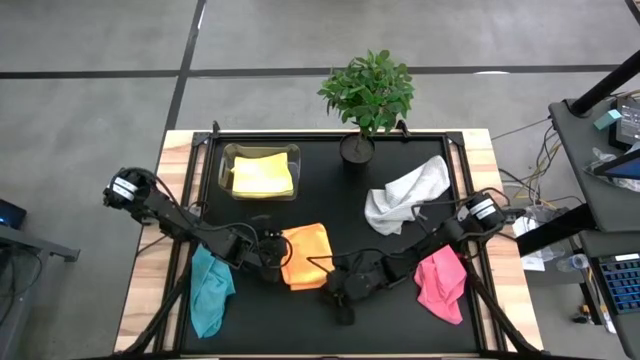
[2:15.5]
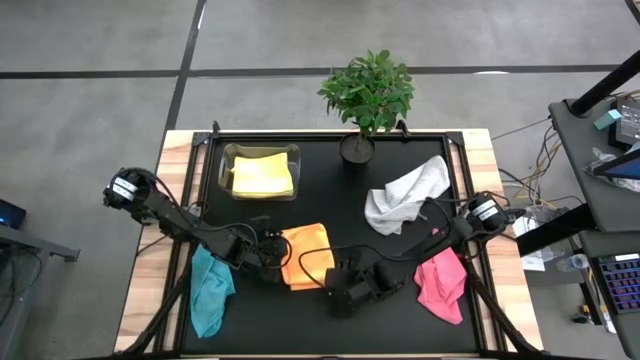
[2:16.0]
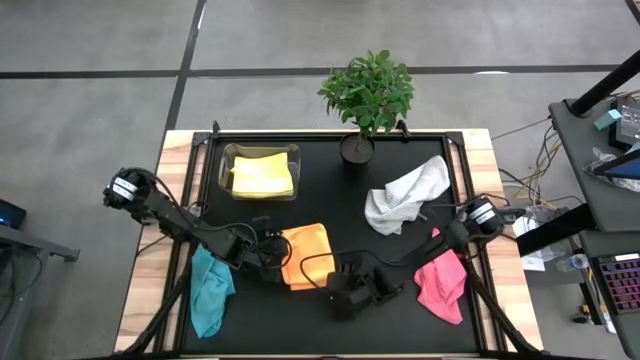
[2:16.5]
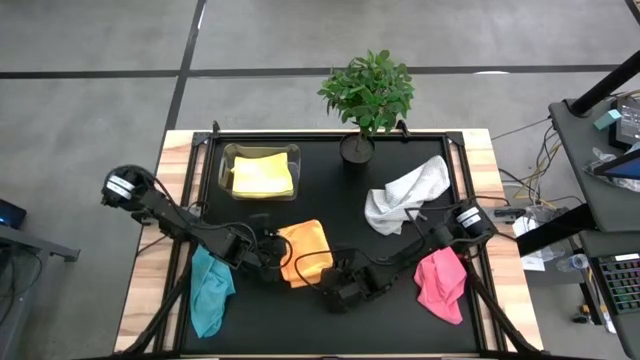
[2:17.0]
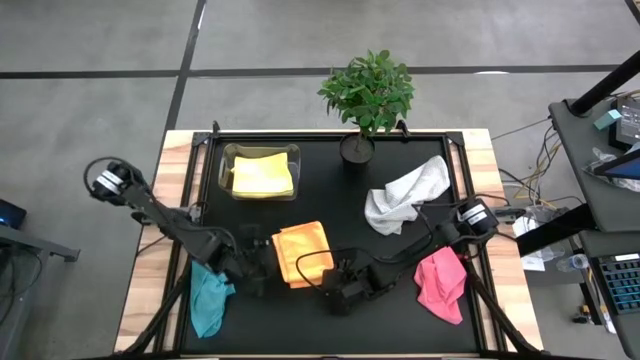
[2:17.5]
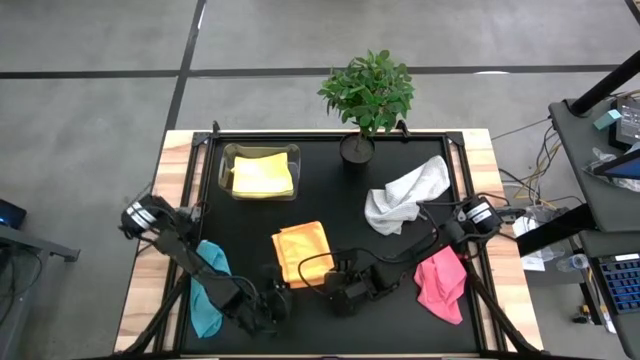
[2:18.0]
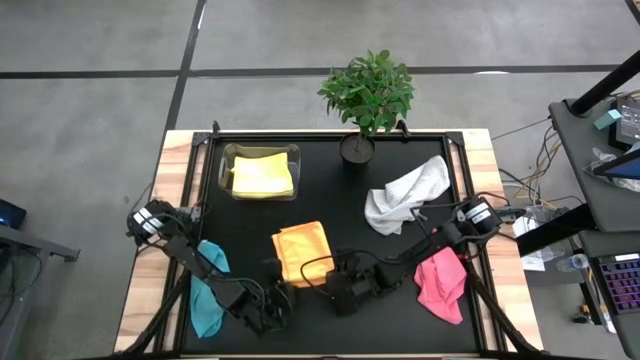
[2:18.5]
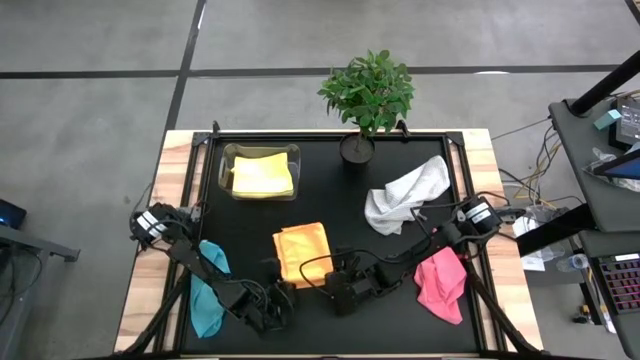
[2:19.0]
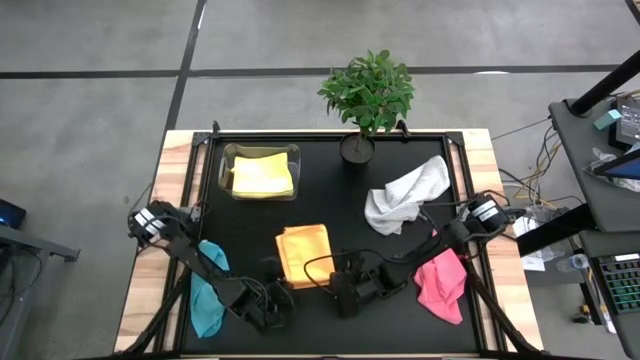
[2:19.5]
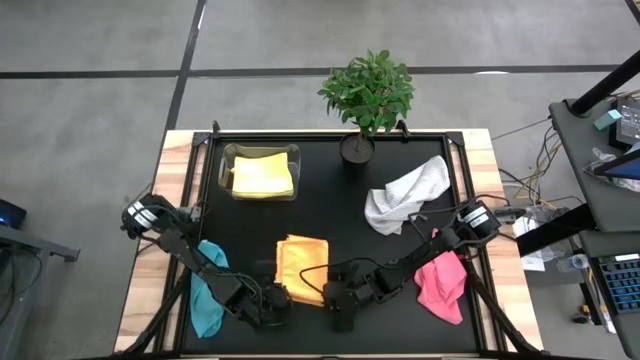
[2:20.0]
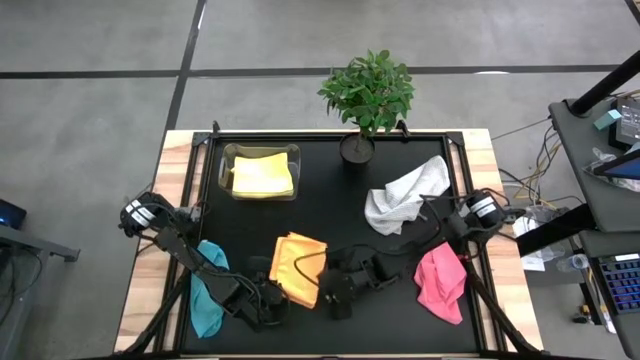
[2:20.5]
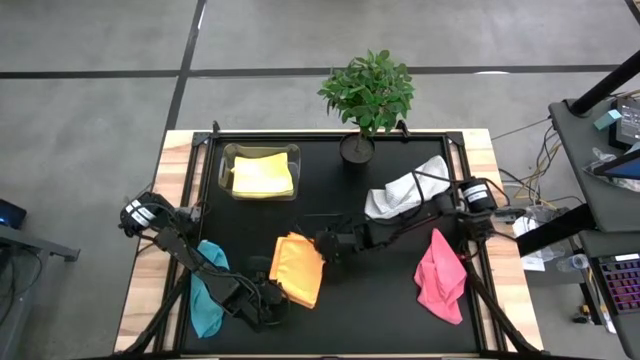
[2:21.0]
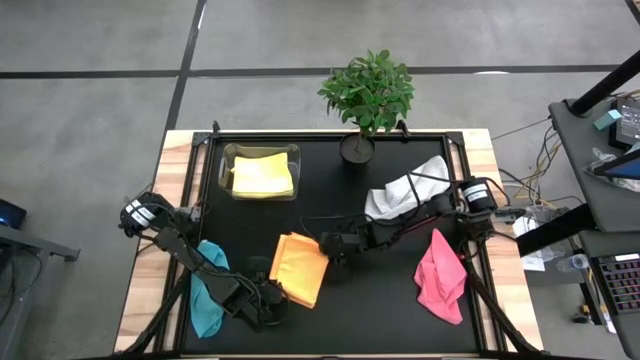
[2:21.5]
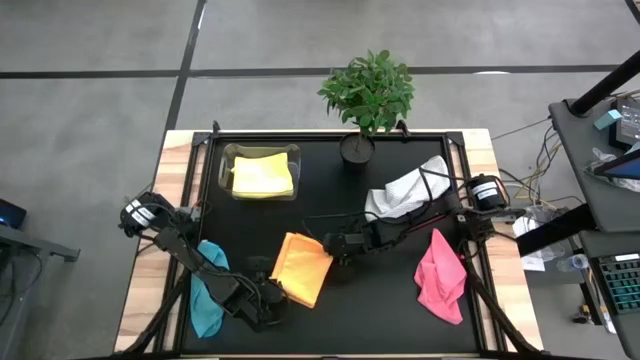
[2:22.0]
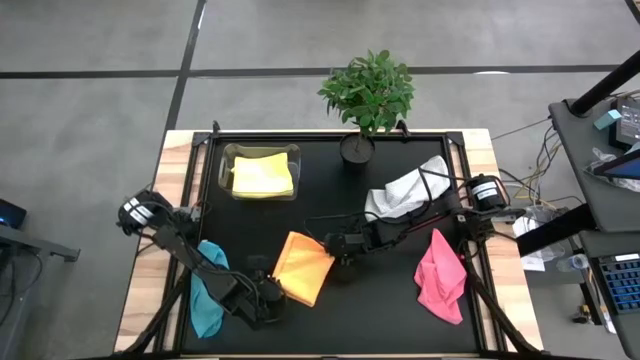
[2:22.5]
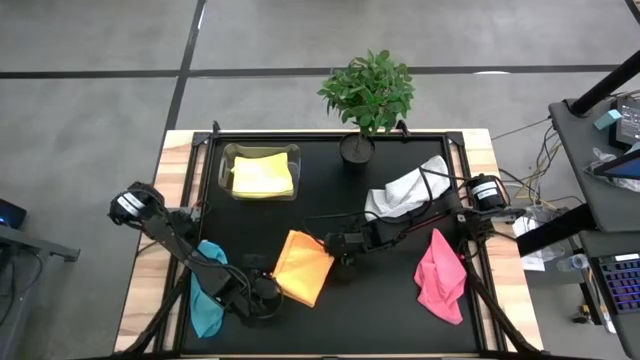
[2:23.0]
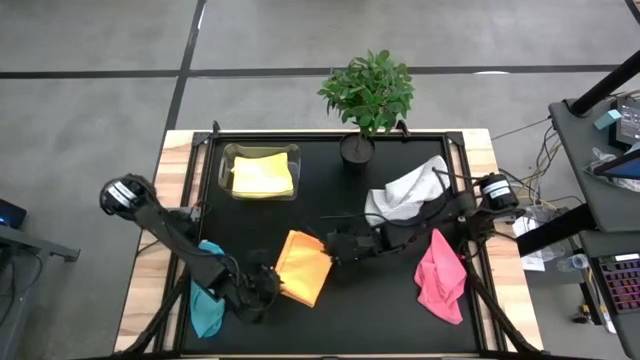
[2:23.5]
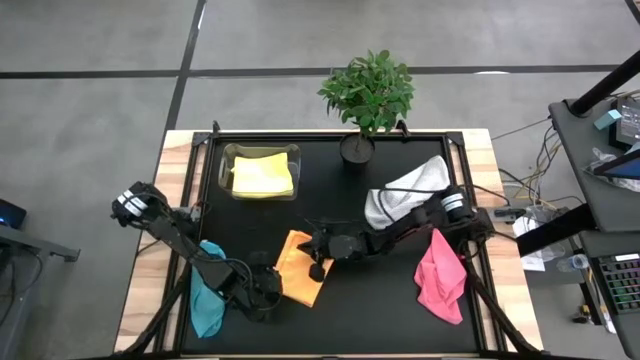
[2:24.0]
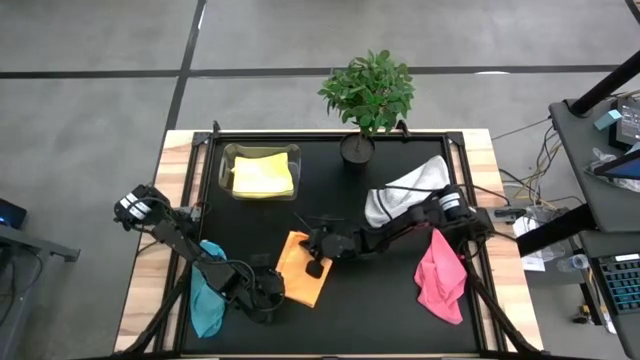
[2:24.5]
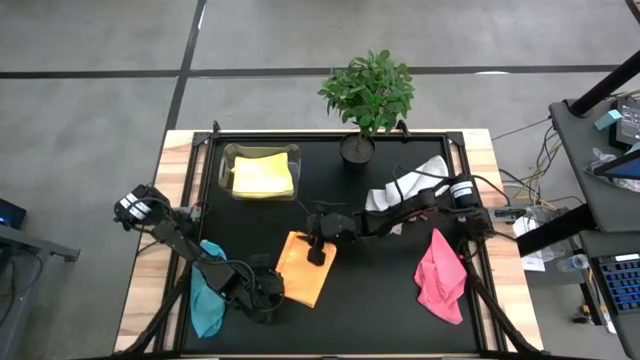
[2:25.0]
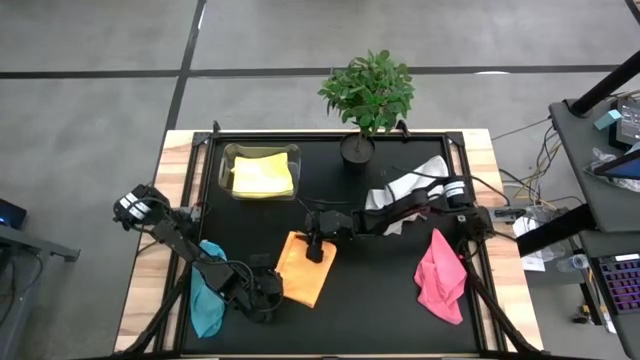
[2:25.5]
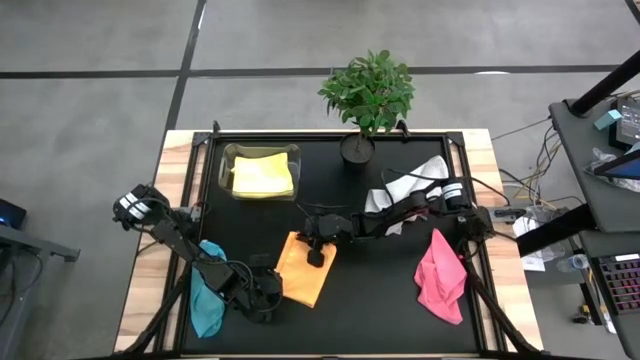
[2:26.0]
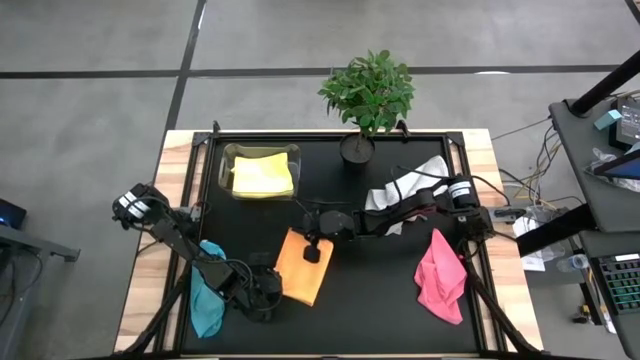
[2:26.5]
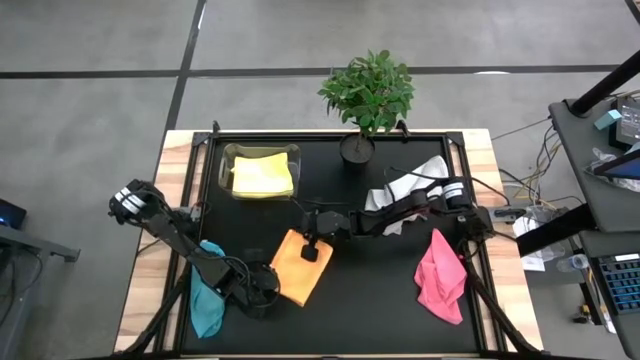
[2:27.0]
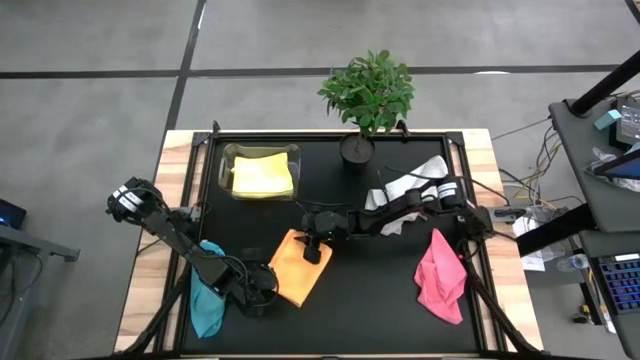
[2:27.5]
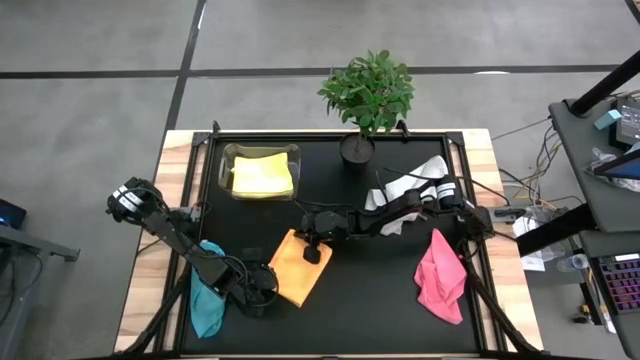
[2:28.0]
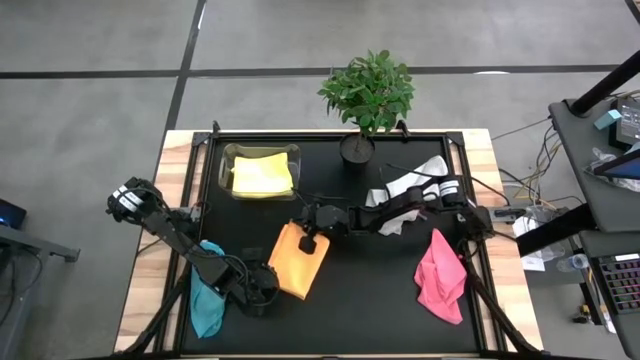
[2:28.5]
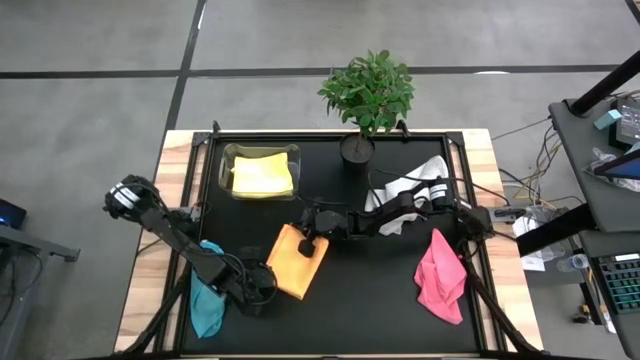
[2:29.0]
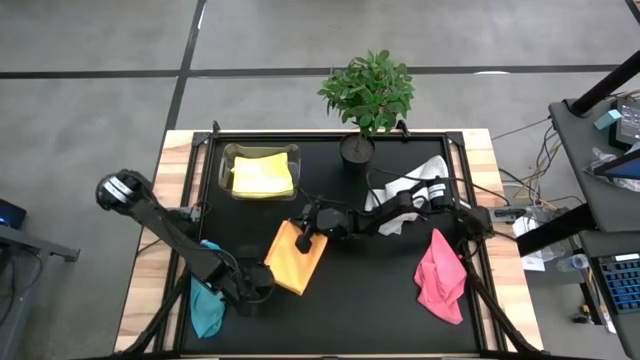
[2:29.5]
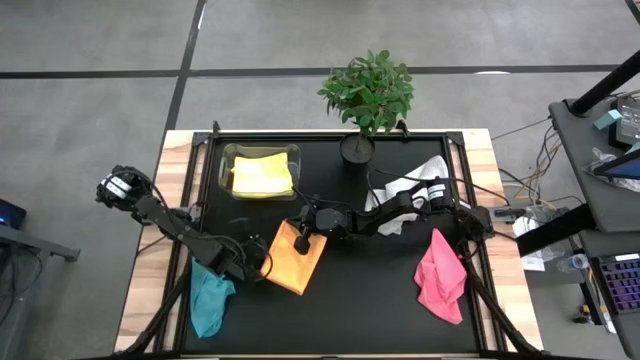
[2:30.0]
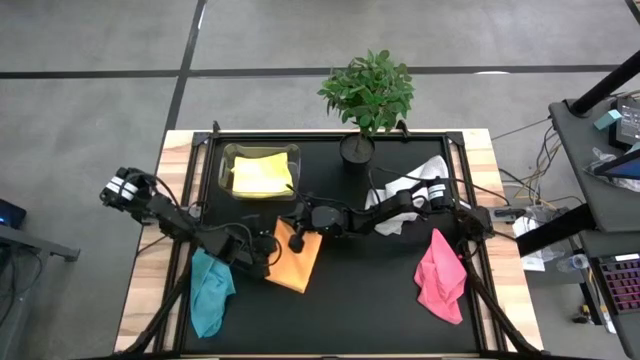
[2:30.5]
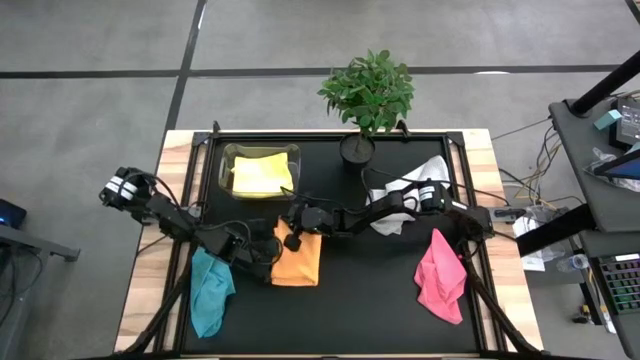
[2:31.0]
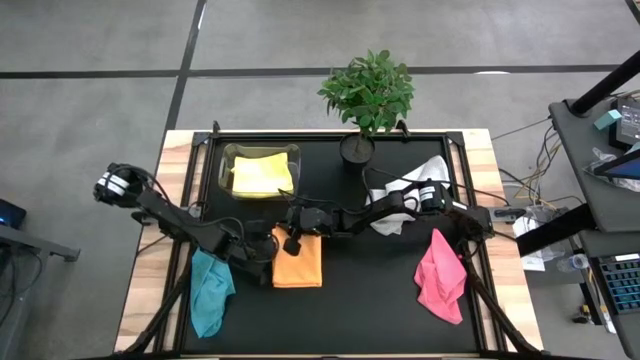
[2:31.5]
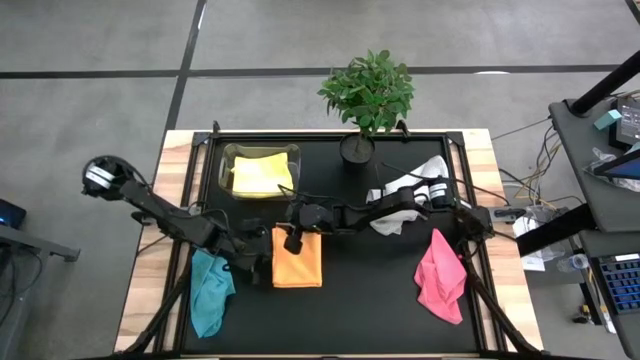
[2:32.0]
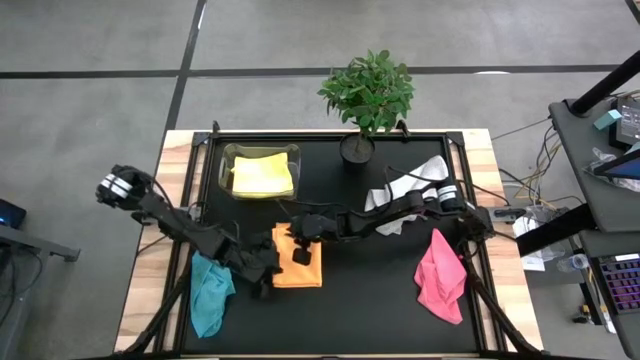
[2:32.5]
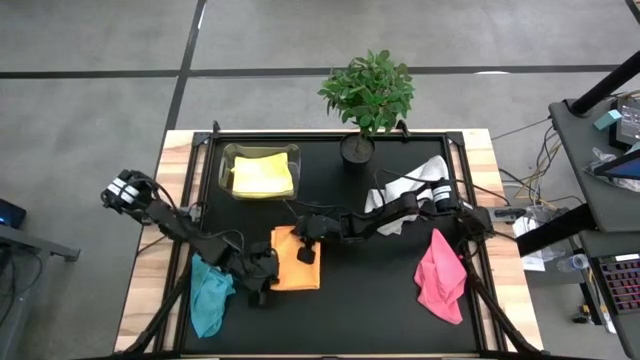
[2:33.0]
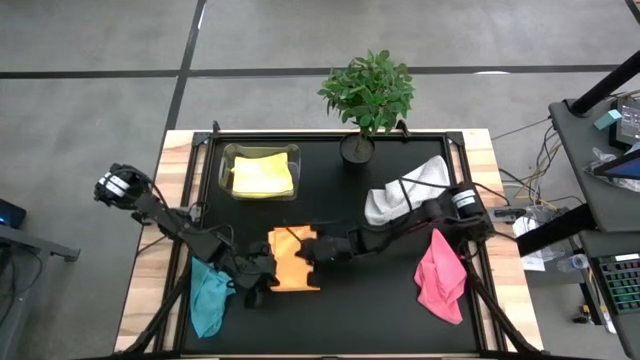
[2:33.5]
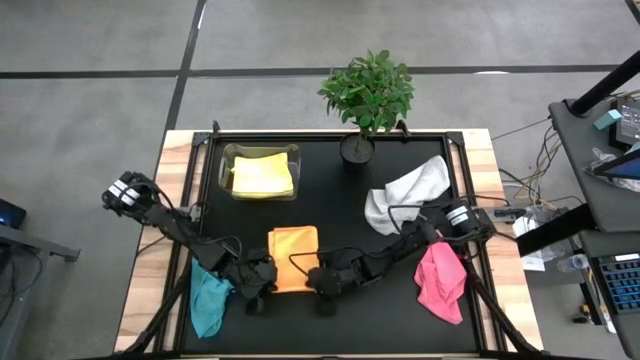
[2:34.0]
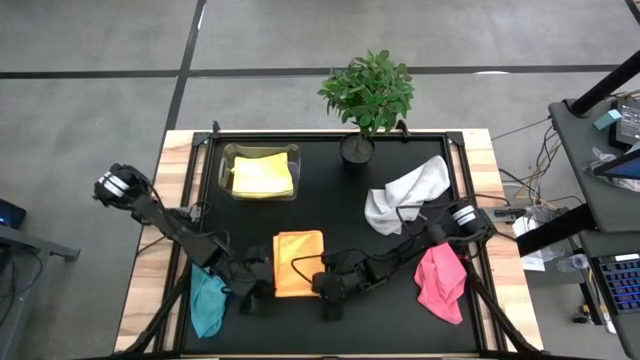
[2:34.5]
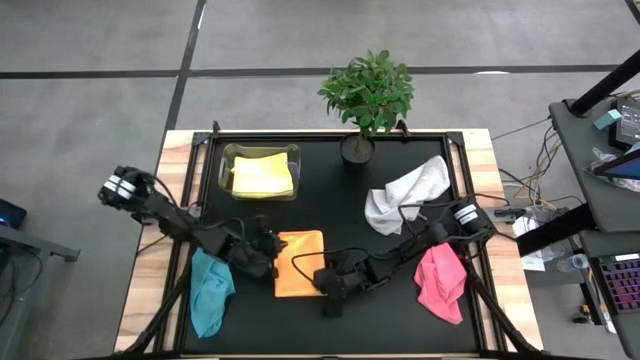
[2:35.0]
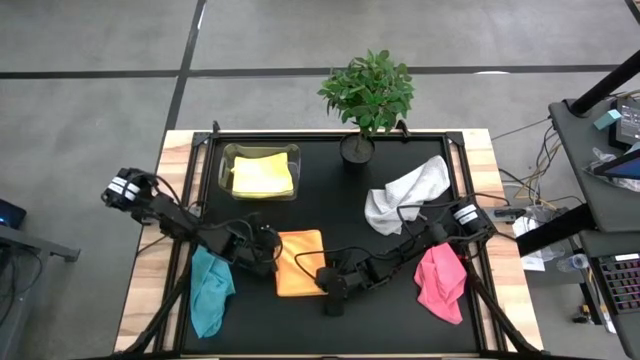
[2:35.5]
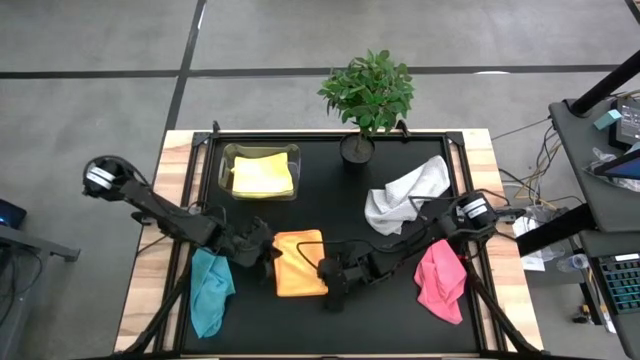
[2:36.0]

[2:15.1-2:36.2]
Task: Fold microfiber towels
Fold the orange towel
